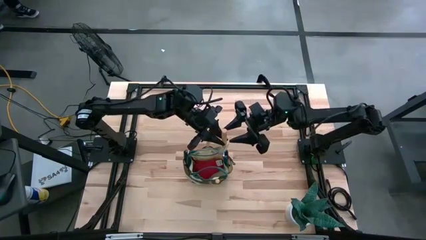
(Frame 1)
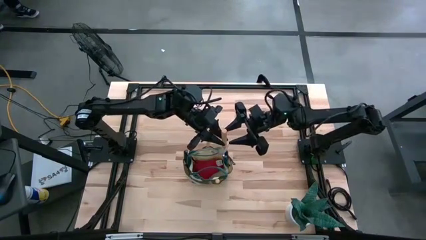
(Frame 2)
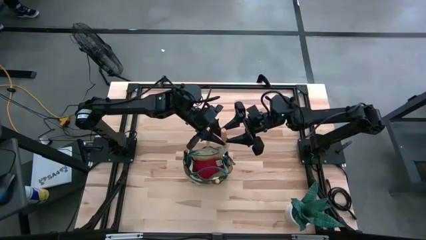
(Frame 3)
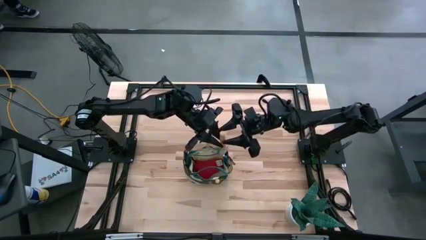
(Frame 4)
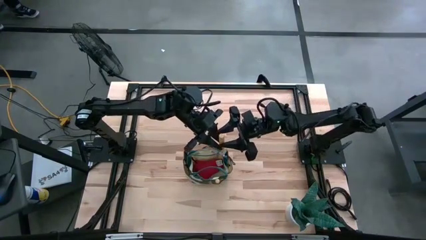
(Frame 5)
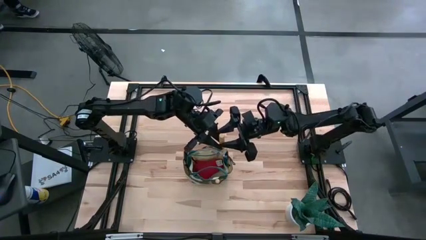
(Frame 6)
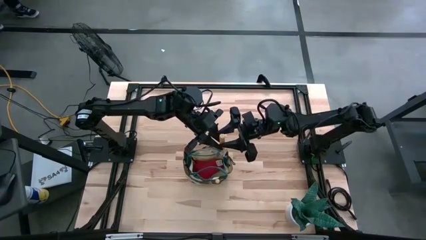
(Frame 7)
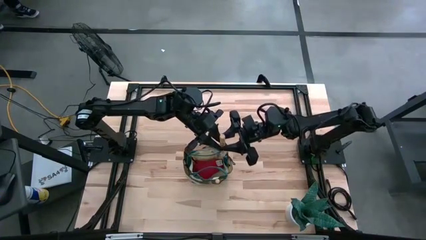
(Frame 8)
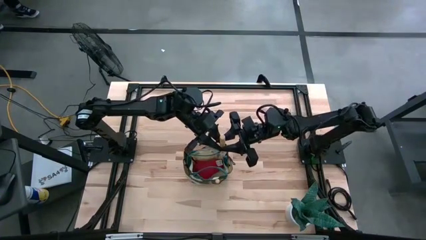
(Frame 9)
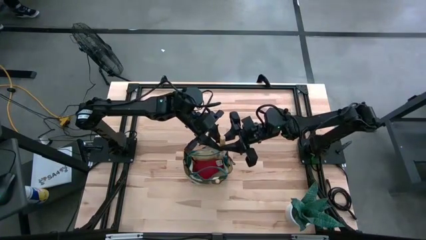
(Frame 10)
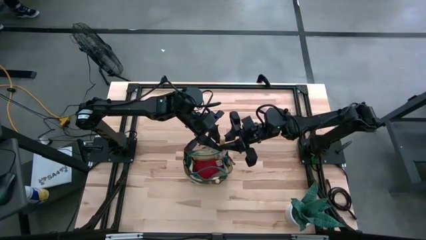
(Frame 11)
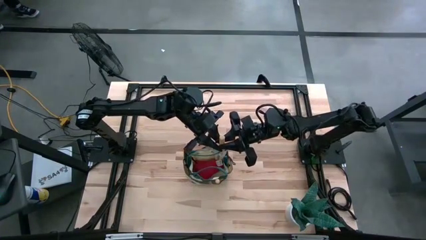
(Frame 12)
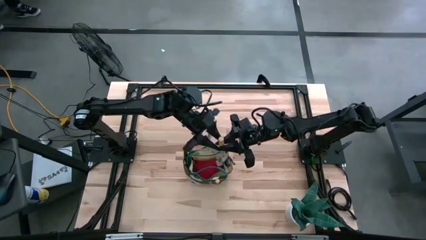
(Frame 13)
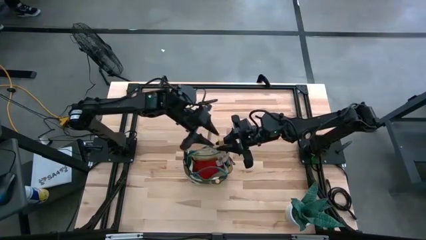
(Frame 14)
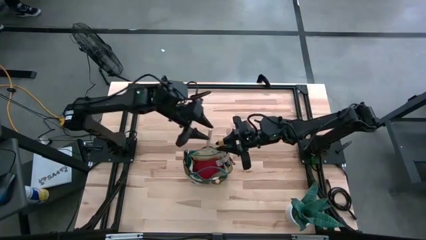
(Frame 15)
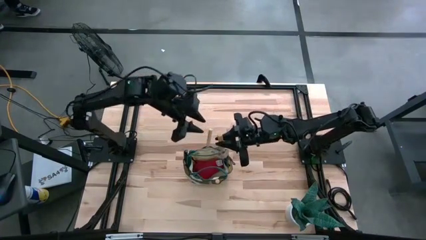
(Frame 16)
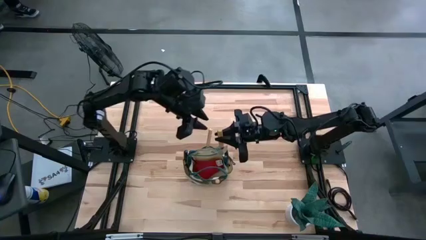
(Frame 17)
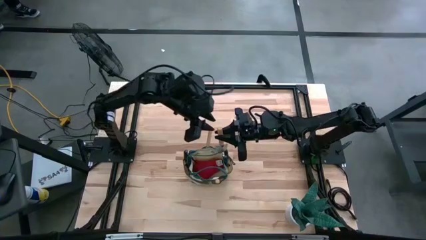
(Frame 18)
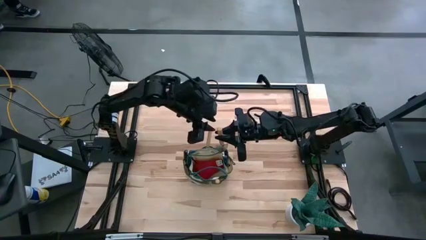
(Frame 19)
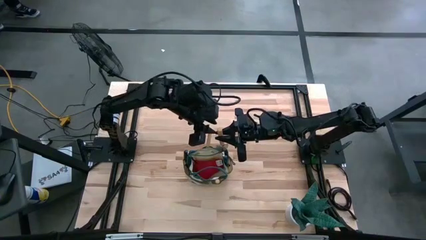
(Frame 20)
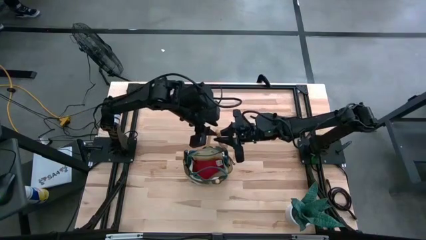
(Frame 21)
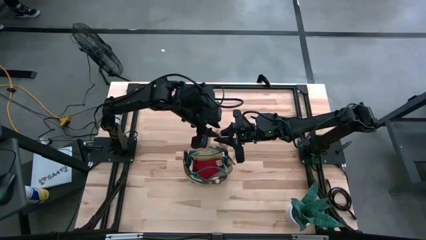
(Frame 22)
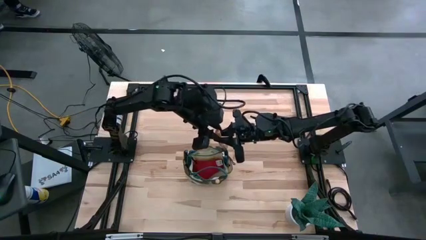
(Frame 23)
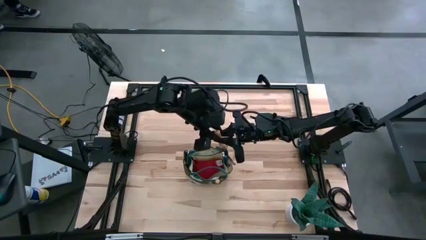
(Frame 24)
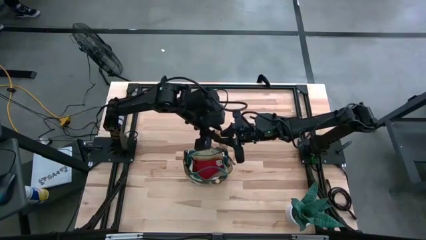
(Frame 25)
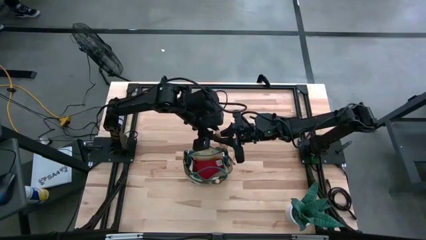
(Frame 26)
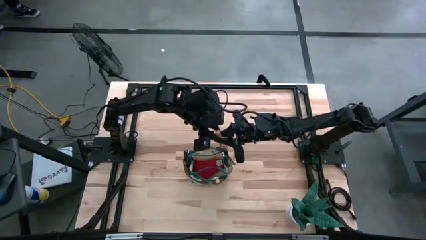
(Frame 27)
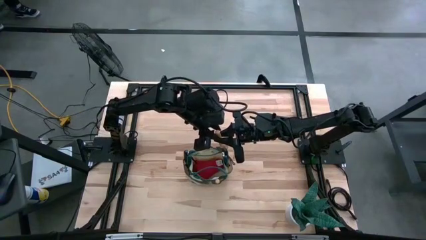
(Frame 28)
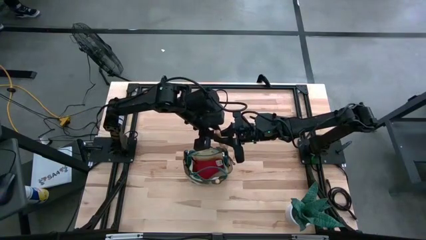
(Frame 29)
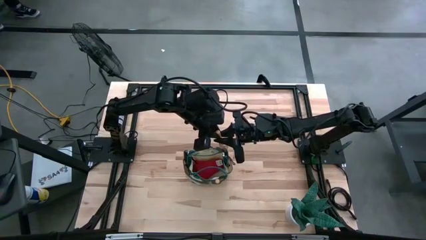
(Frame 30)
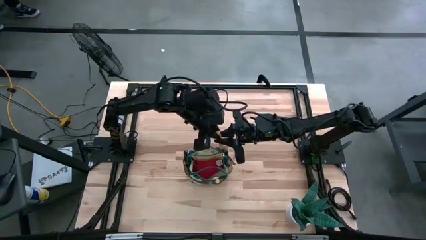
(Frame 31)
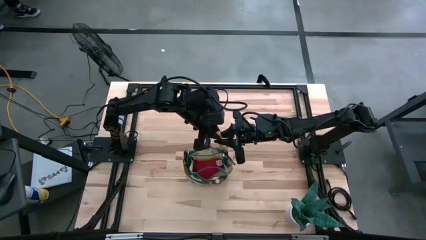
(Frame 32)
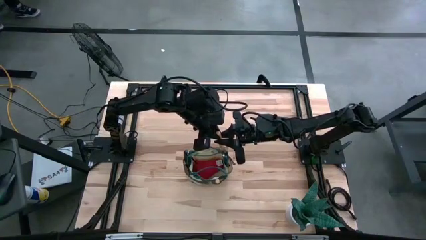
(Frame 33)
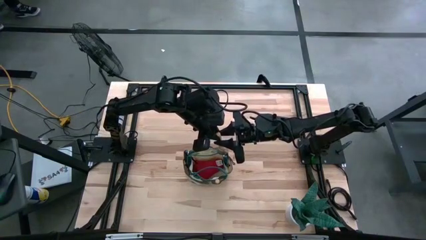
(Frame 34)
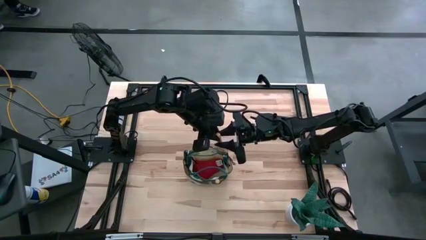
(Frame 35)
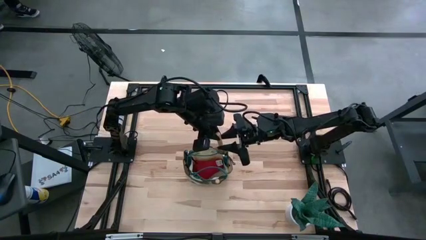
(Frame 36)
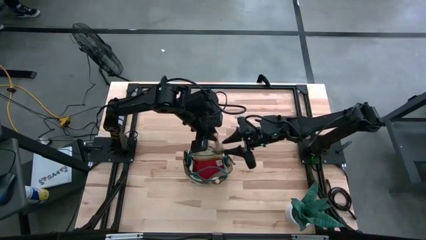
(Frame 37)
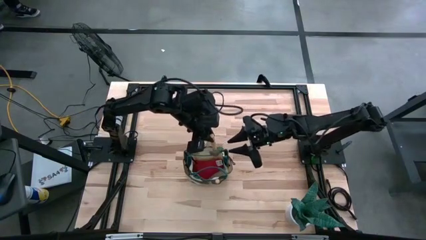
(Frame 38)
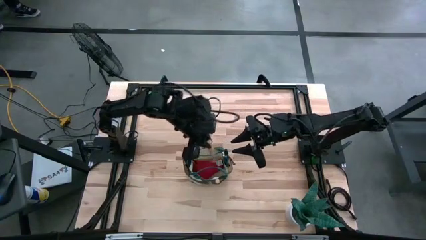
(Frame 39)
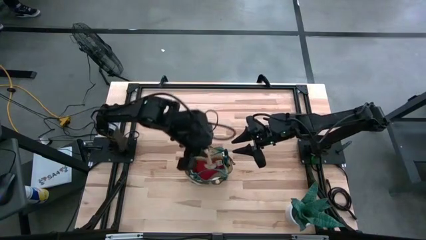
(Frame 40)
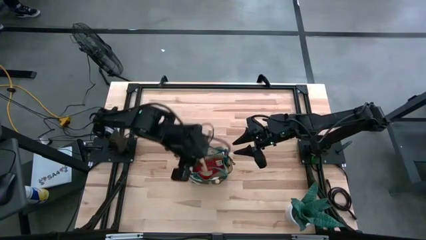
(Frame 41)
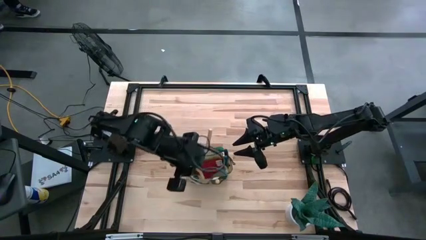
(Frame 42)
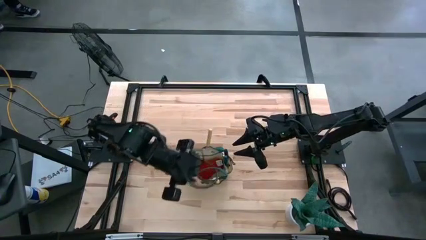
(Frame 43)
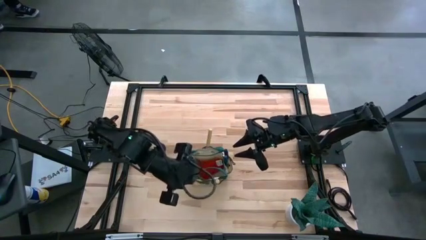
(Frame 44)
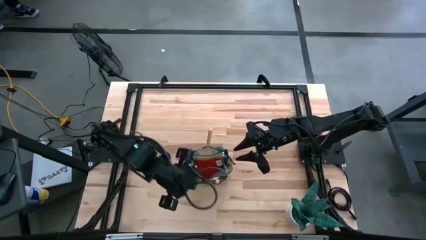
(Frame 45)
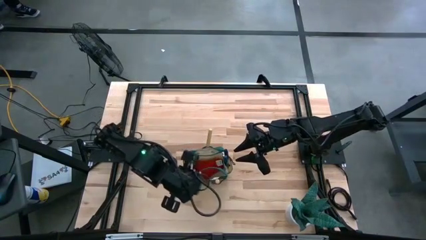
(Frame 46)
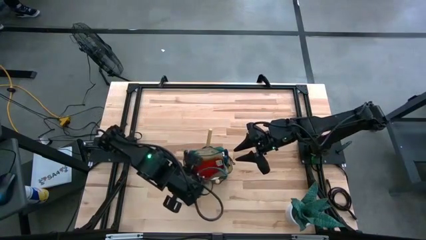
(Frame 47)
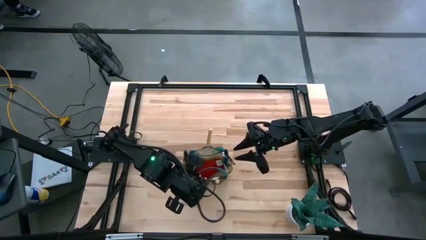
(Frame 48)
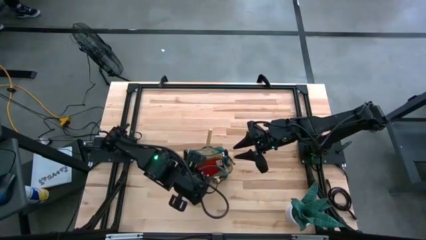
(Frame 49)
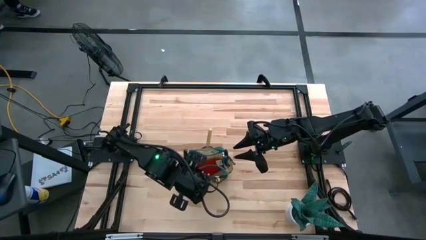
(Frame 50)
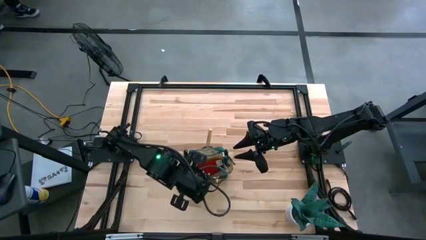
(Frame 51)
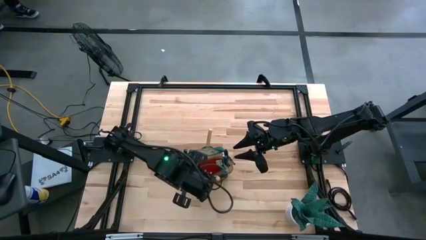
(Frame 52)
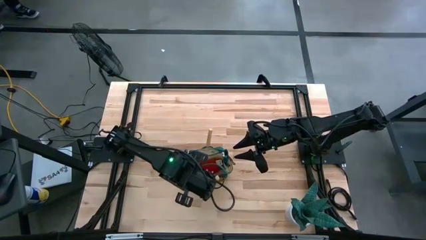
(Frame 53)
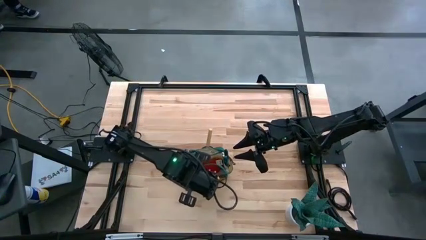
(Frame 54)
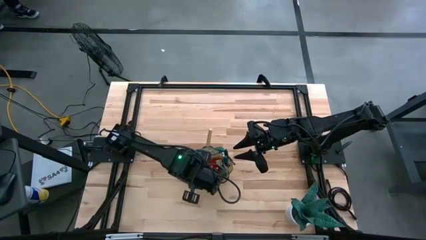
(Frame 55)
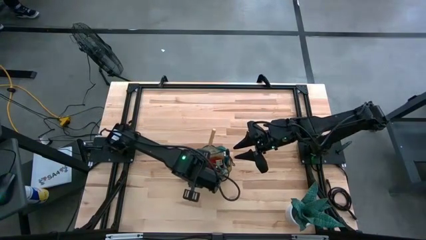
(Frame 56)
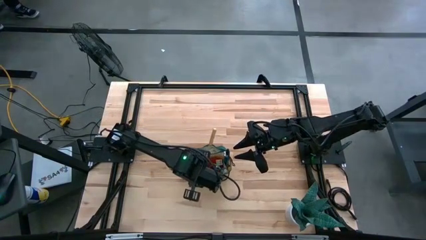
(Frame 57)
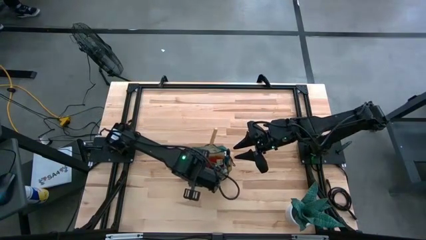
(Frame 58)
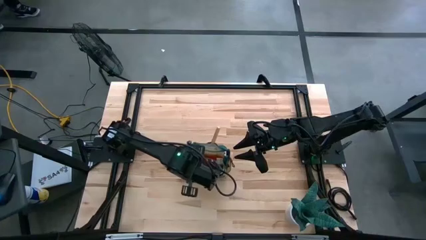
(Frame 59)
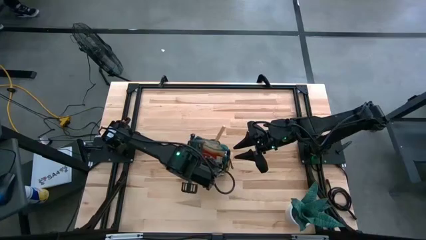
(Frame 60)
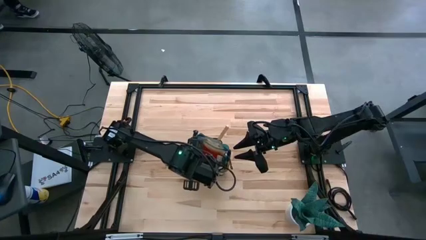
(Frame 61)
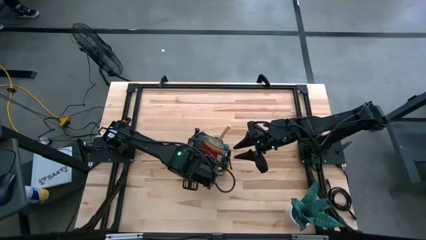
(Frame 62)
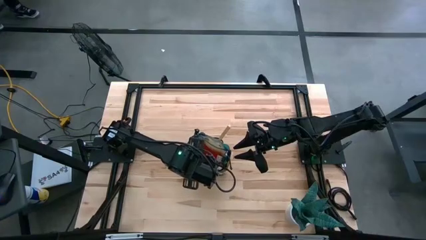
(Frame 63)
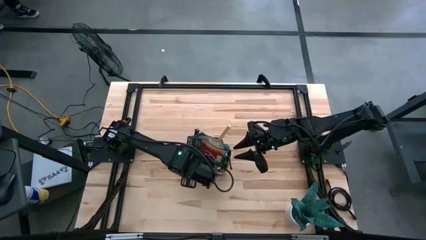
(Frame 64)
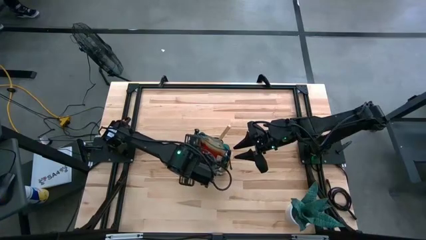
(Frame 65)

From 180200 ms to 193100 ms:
Task: Pick & Place Garden tools in Gardening bag
Put the light brown trowel into the white gardening bag

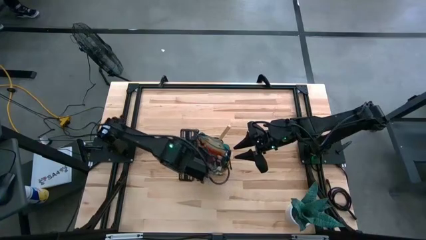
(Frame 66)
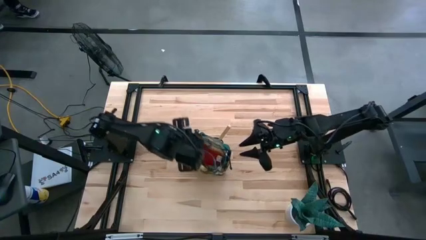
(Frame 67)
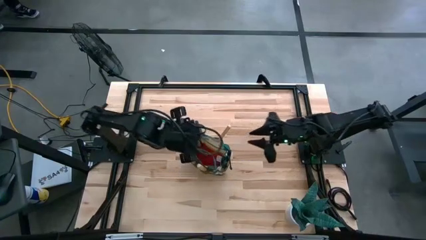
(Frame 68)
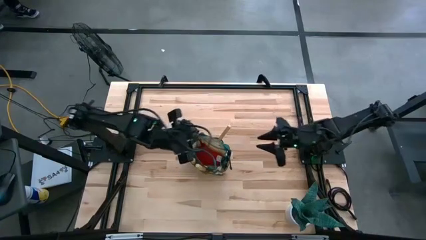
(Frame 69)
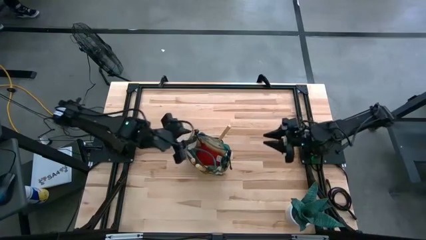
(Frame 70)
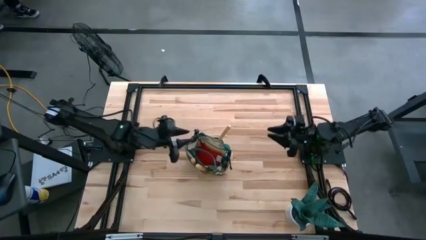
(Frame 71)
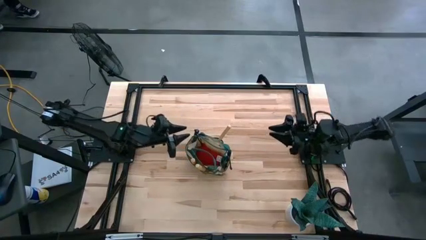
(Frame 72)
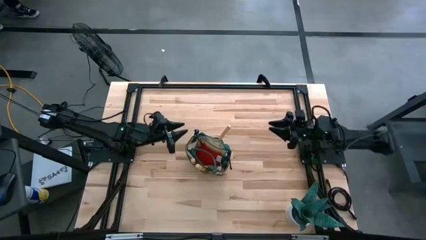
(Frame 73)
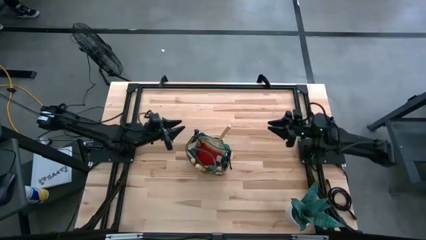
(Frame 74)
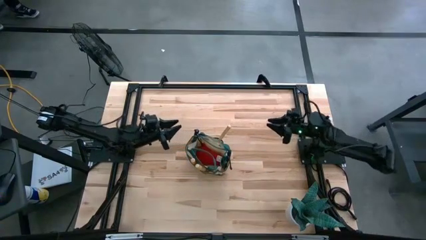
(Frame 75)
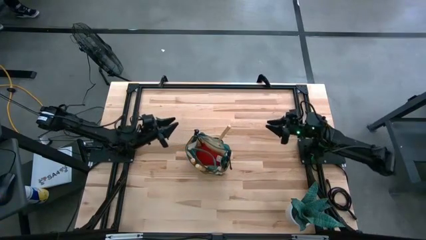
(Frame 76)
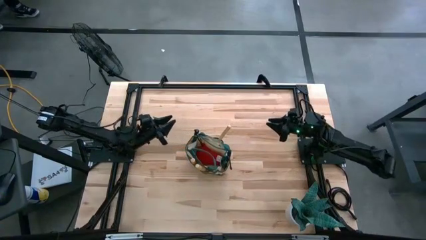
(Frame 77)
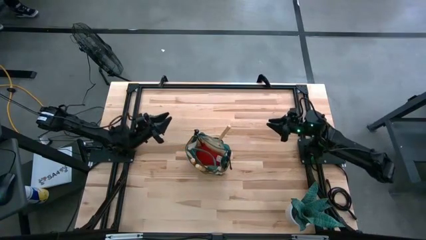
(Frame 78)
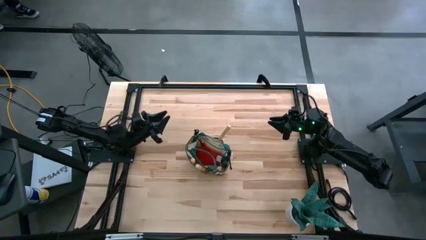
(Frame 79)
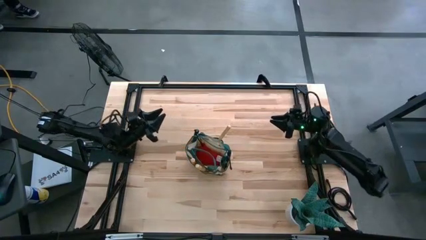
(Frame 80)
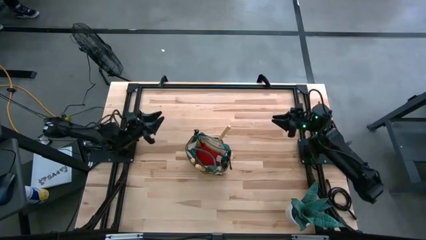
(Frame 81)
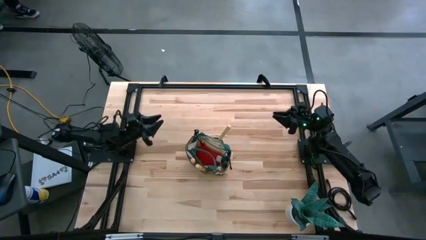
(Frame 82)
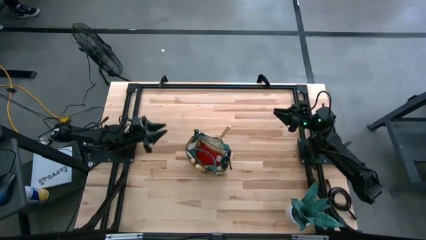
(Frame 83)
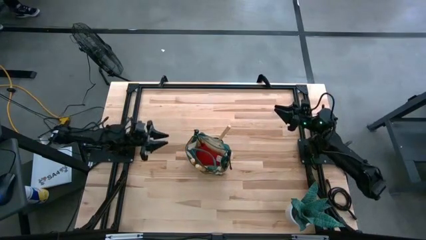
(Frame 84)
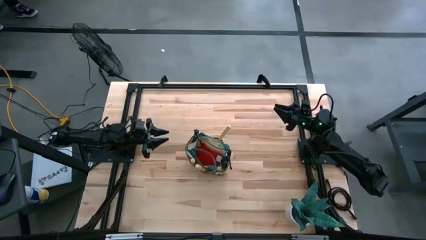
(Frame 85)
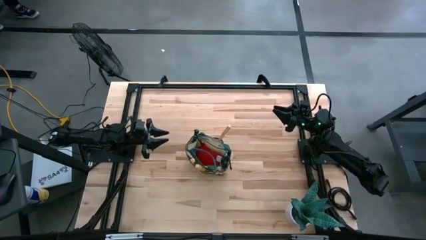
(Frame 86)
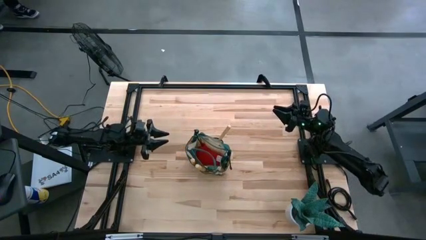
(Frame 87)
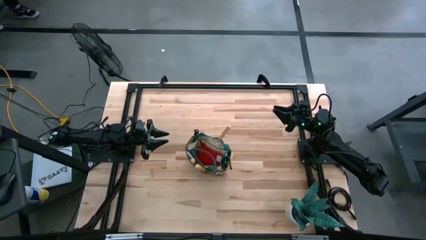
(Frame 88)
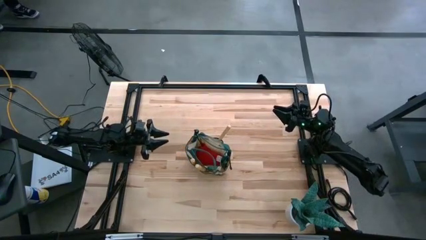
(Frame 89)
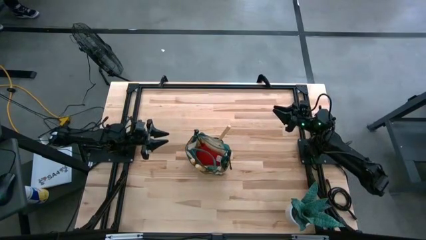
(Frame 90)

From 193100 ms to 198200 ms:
Return to Home Position
